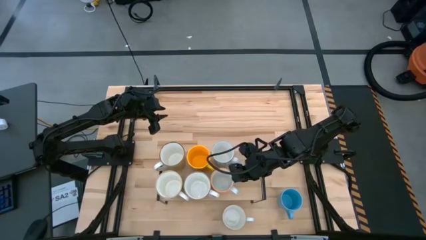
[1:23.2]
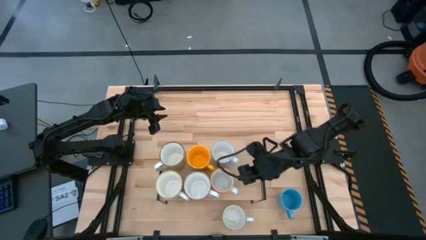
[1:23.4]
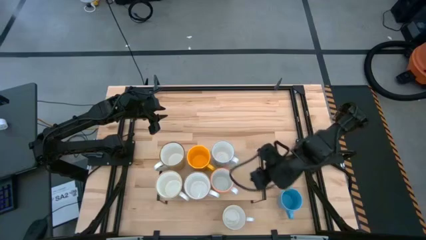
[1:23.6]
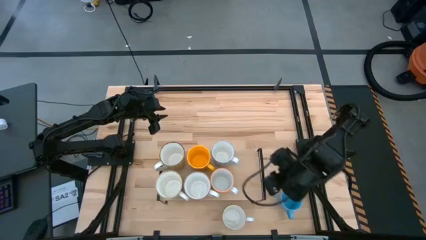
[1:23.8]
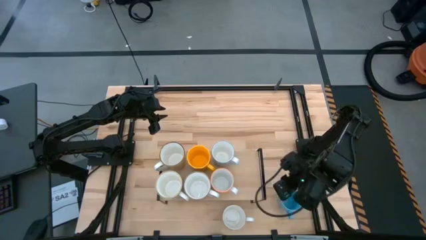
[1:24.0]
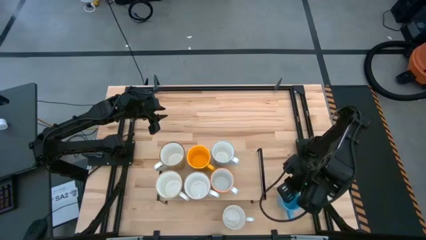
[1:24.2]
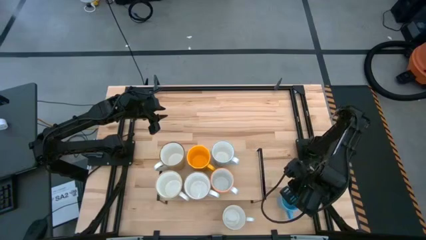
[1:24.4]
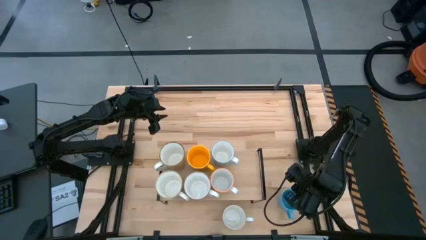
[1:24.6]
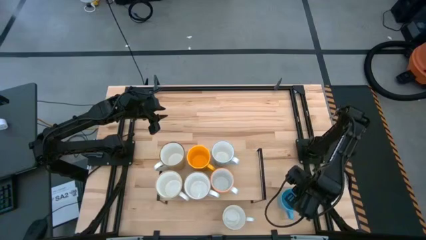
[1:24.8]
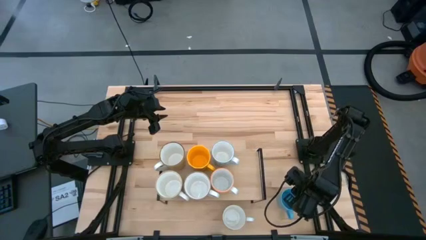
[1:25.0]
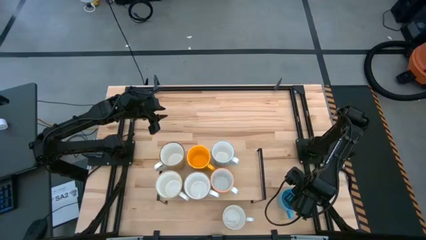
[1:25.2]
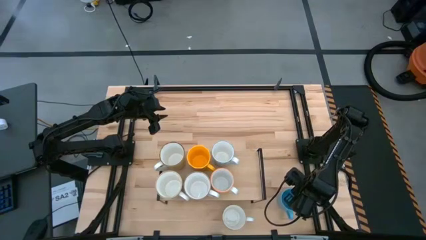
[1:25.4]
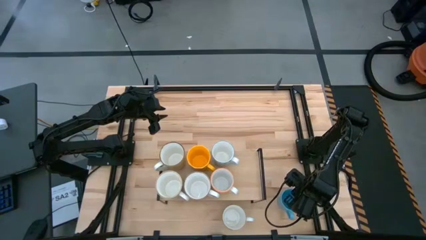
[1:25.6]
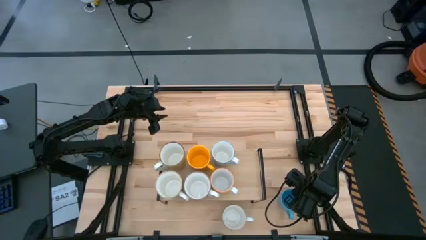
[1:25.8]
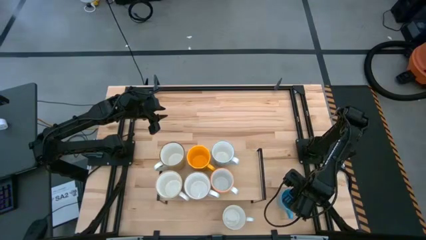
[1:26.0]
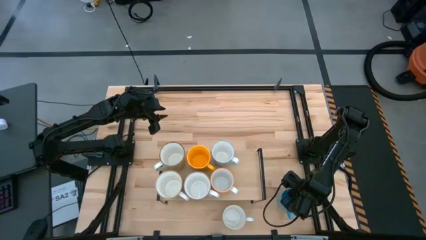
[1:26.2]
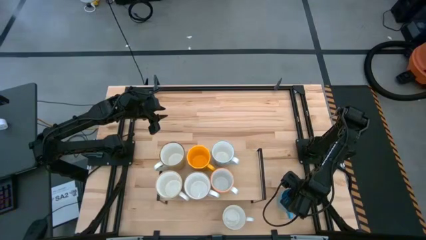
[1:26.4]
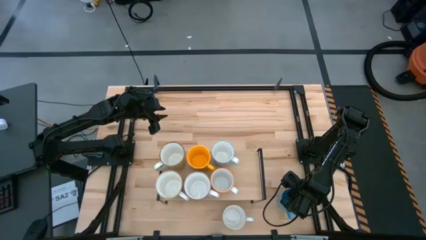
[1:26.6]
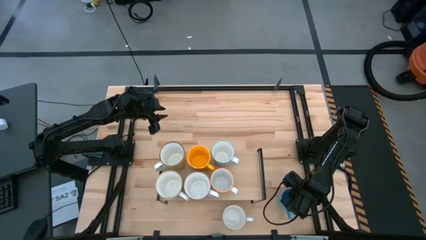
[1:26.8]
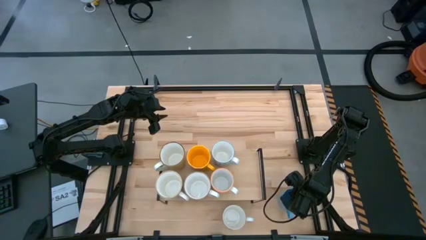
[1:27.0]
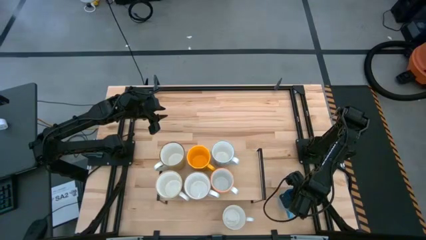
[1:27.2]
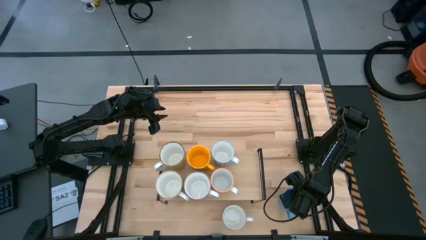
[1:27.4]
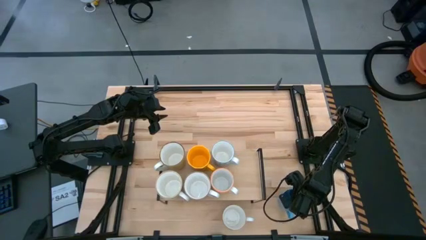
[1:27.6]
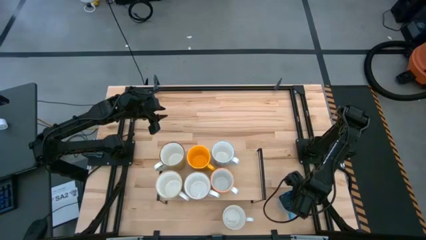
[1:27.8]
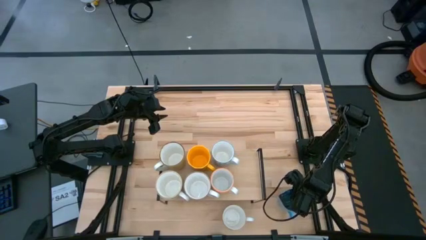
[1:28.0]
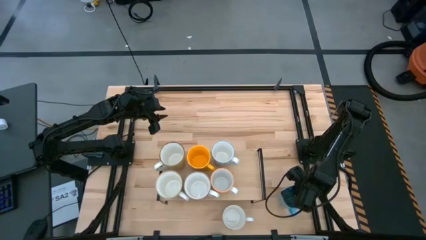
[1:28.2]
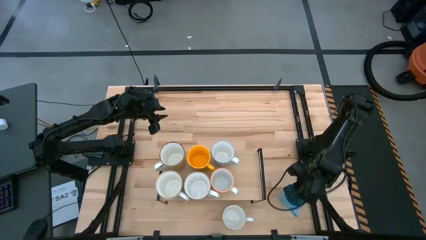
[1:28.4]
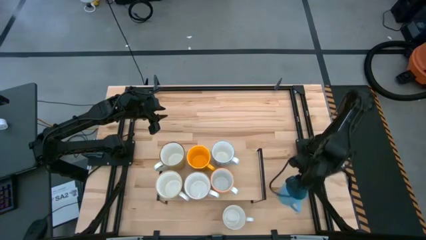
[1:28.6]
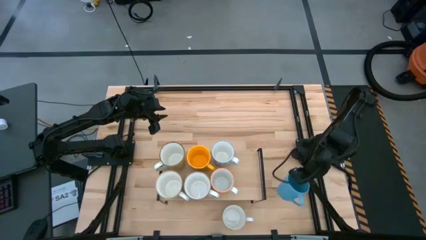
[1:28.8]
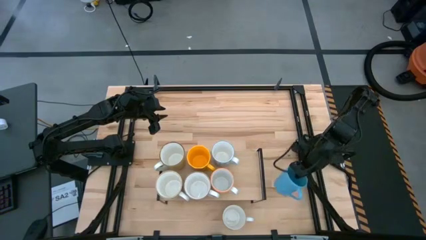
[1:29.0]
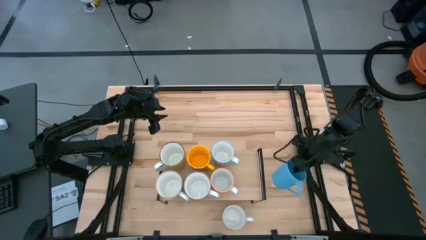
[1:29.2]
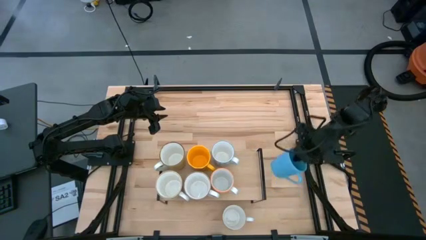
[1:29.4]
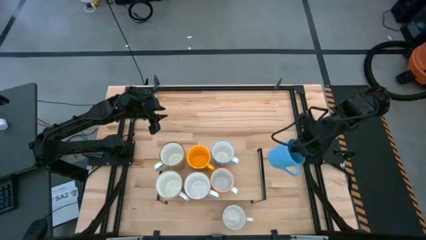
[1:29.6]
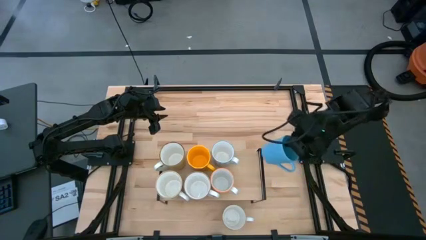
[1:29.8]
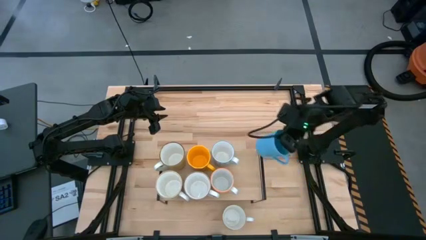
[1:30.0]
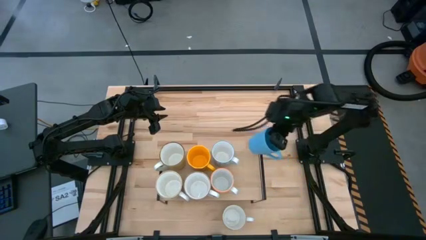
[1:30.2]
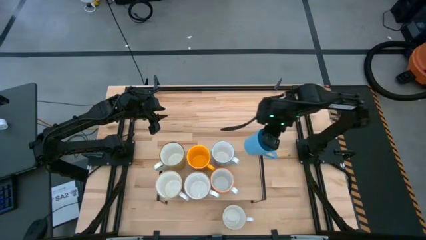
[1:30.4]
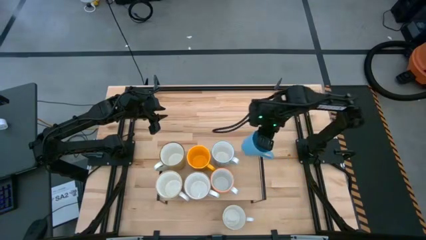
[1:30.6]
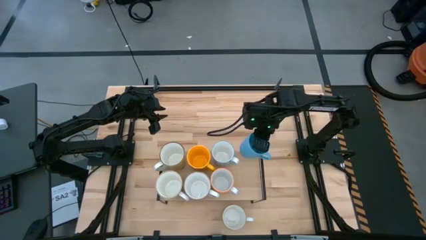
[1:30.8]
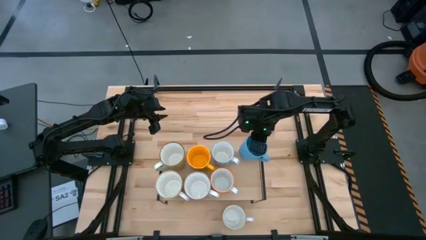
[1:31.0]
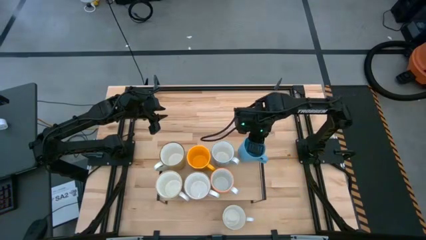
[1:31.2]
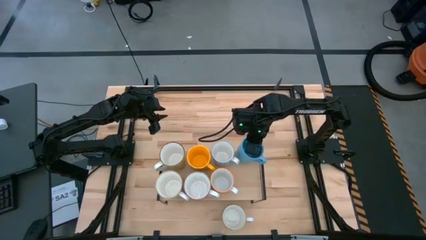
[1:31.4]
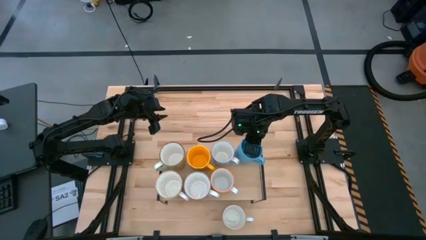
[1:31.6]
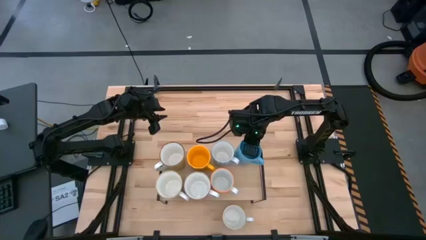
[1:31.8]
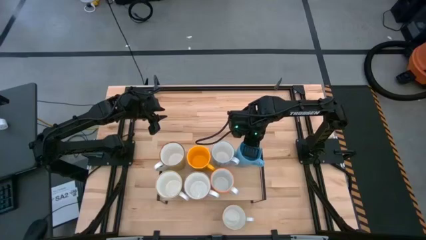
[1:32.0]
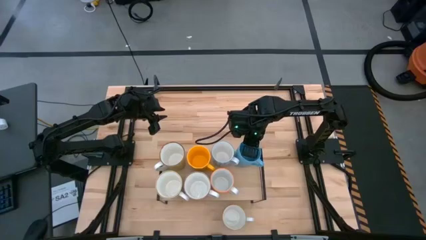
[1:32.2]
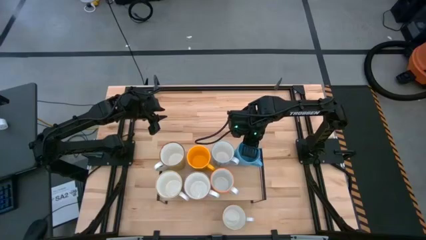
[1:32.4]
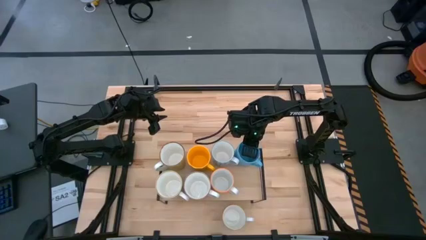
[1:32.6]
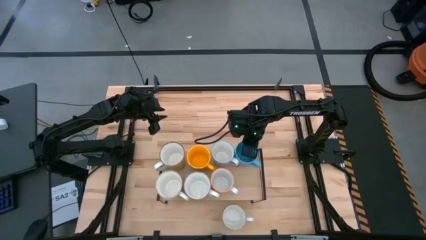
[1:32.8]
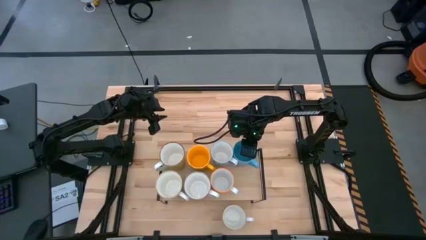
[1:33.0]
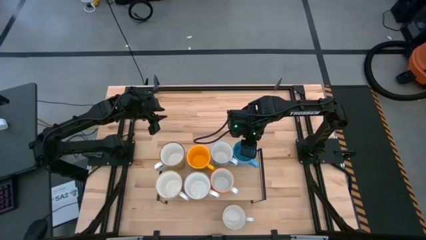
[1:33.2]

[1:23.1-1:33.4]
Task: Place coffee mugs
Put the blue mug on the shelf

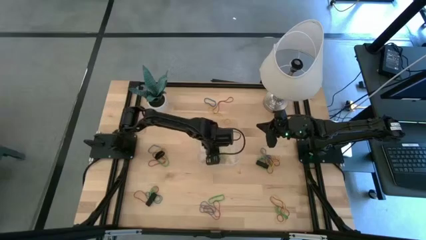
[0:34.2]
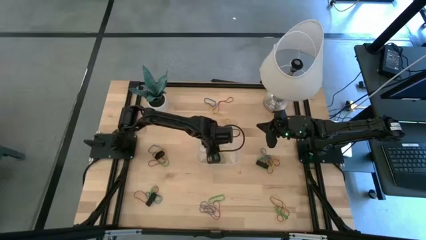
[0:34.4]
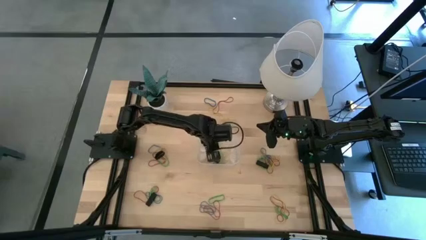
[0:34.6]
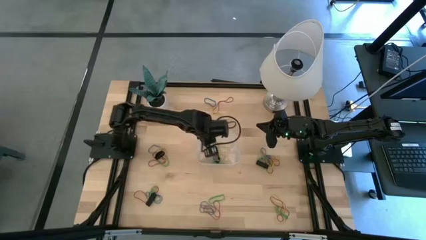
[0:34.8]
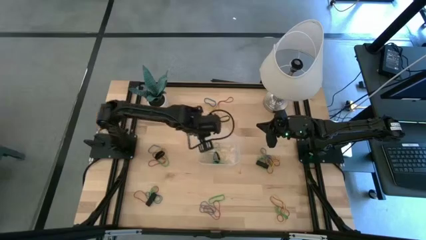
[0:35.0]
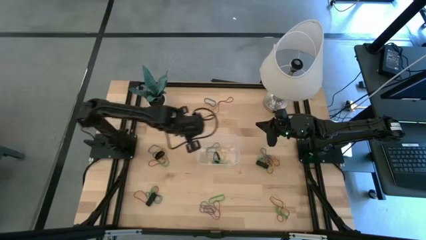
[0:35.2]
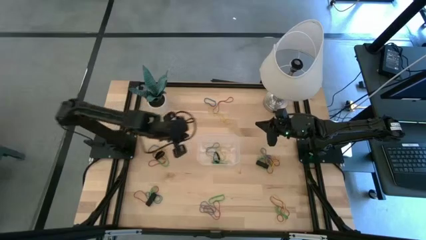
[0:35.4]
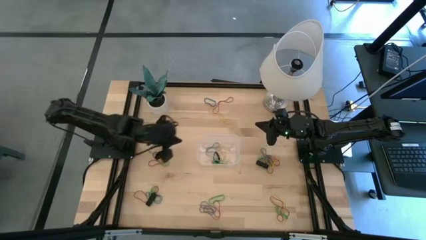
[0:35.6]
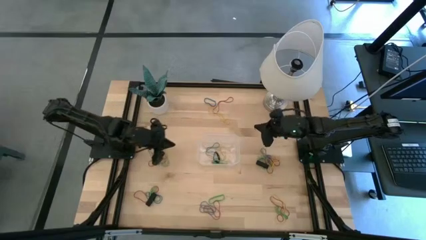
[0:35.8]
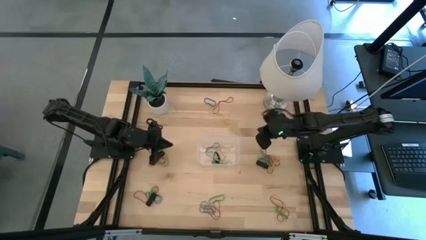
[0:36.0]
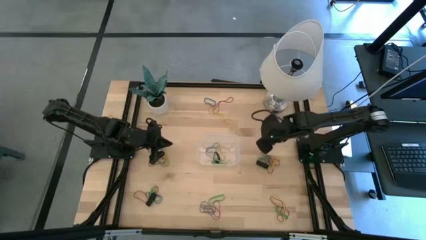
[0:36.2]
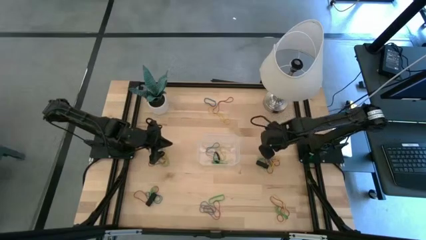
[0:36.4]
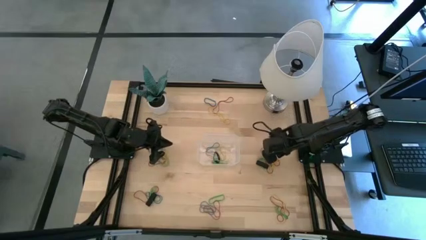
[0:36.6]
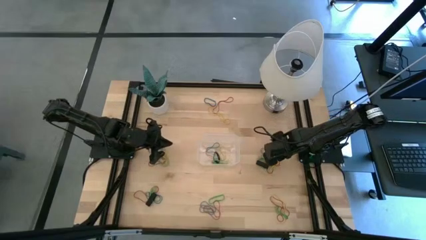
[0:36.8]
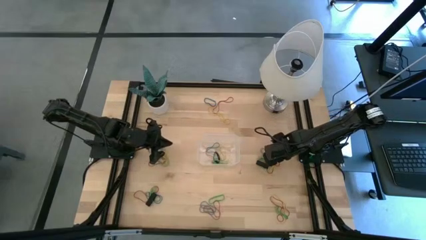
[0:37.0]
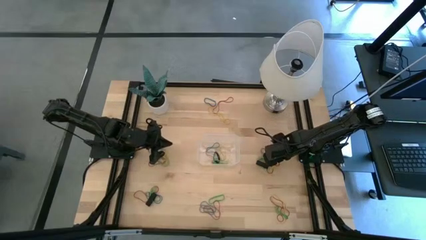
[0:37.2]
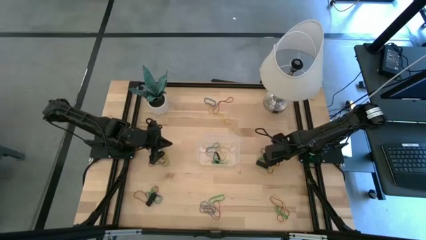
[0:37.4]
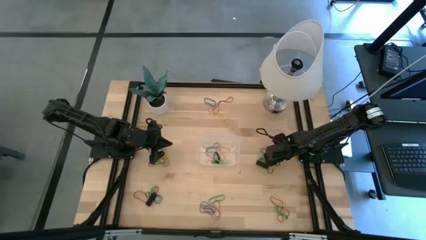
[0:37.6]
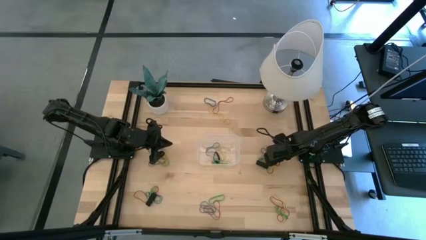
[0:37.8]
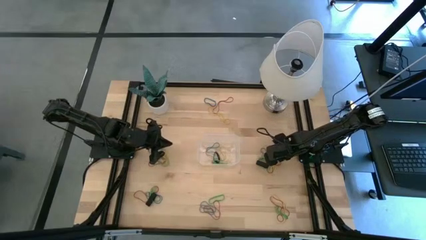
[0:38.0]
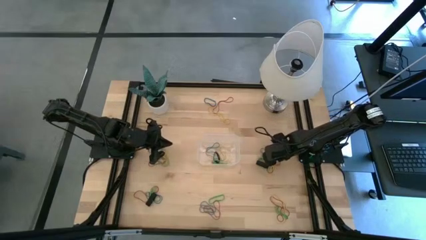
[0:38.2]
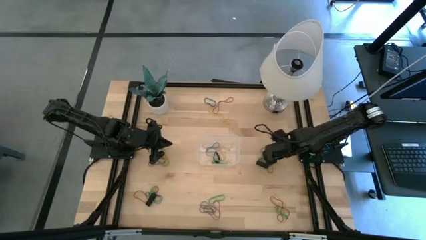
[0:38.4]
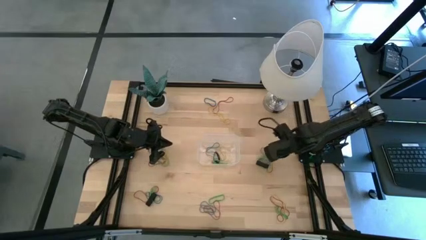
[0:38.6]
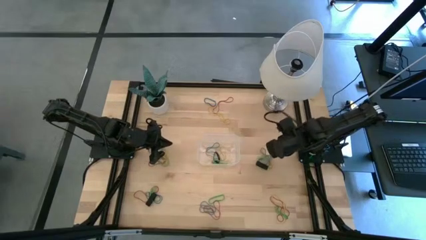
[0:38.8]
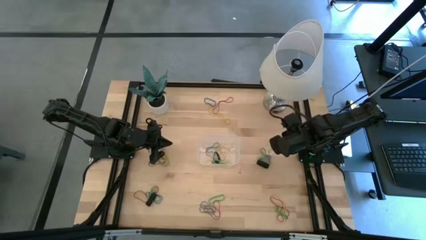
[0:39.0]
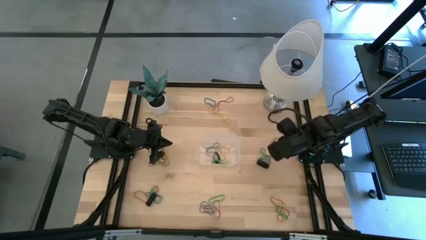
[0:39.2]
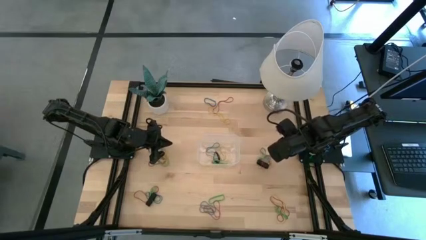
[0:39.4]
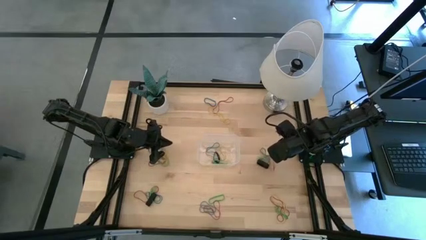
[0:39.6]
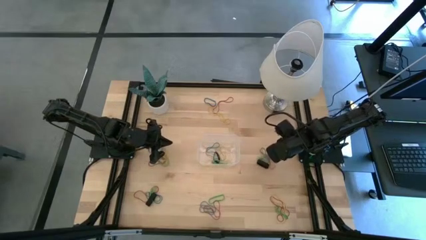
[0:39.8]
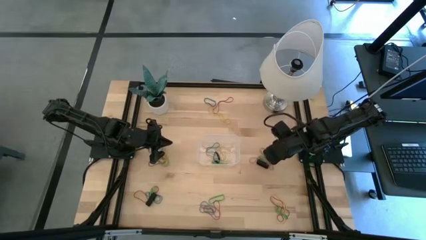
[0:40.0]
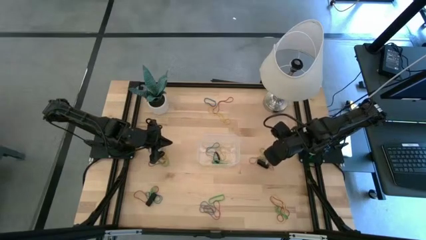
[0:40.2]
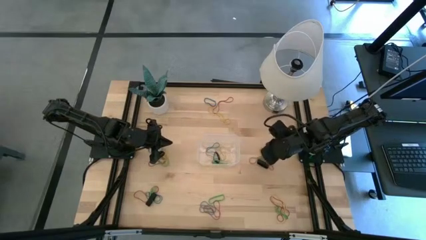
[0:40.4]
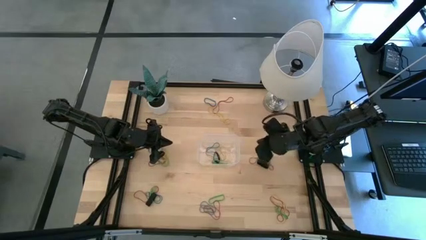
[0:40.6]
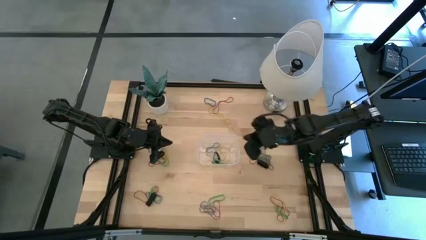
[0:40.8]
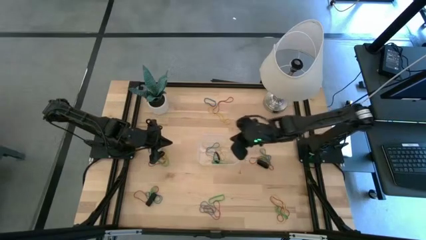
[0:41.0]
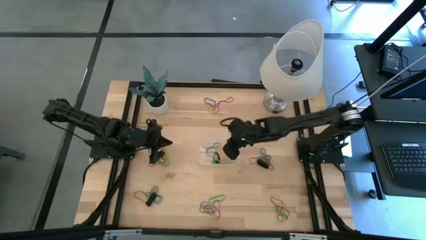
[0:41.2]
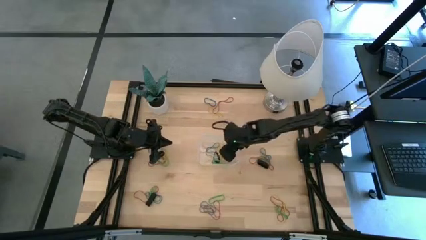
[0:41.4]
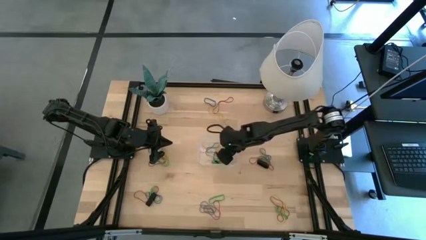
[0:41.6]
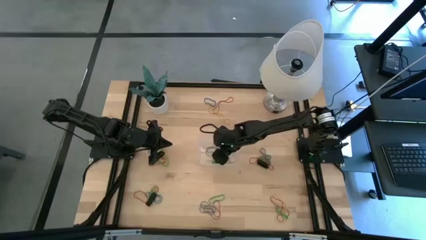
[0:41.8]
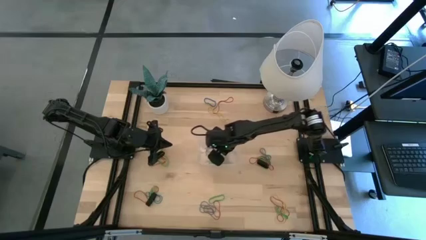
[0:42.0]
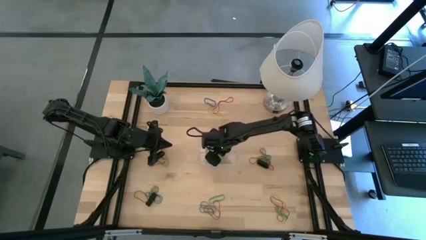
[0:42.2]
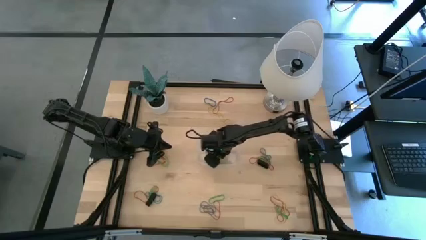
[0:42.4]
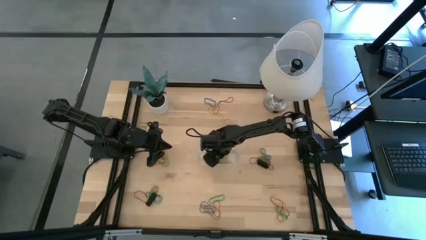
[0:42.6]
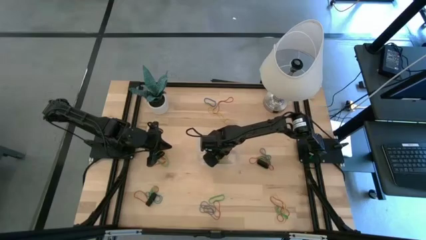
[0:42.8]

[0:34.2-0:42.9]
Task: Pick and place rubber bands into bin
Put the yellow rubber band into the transparent bin
